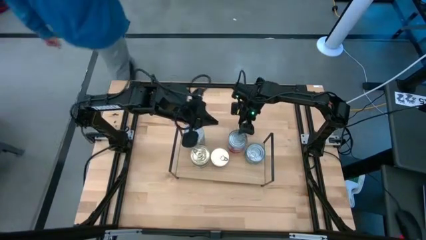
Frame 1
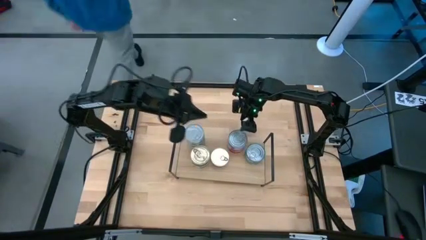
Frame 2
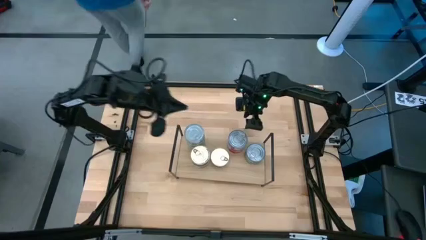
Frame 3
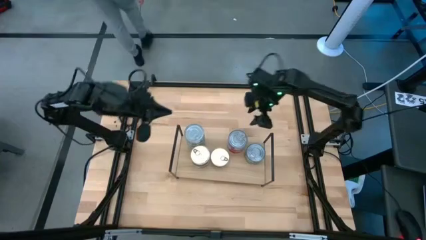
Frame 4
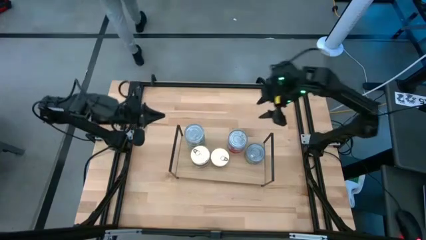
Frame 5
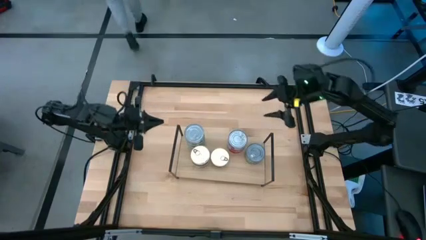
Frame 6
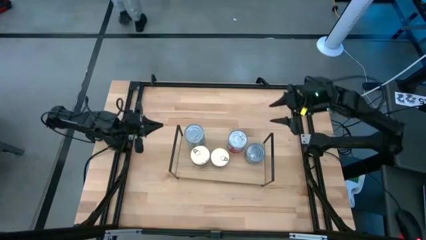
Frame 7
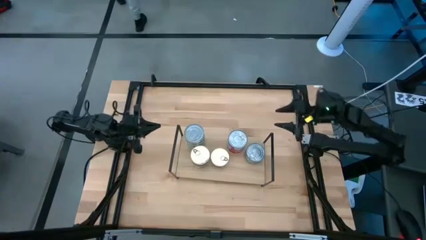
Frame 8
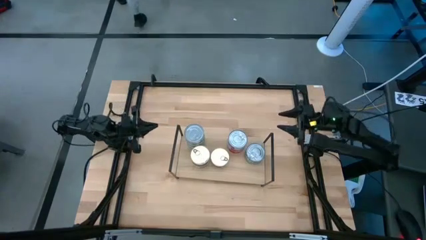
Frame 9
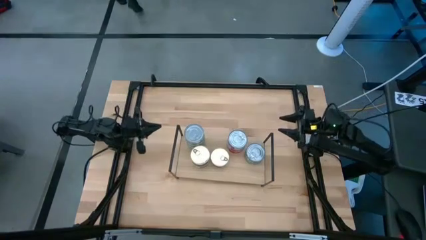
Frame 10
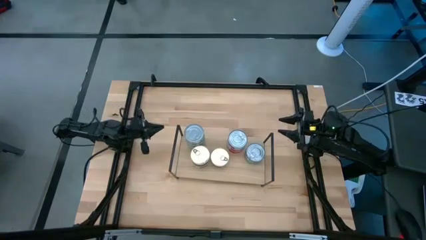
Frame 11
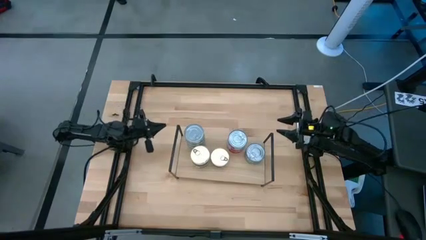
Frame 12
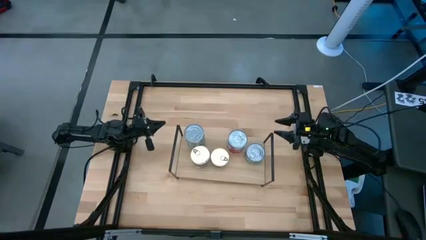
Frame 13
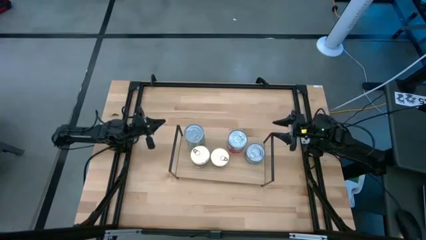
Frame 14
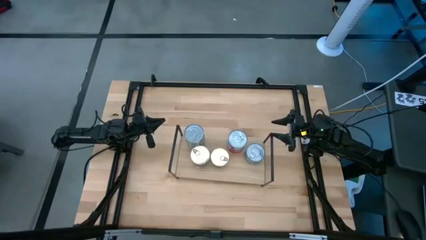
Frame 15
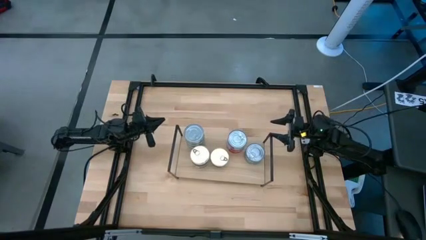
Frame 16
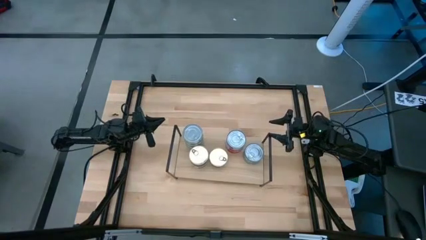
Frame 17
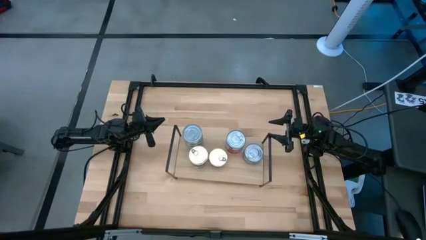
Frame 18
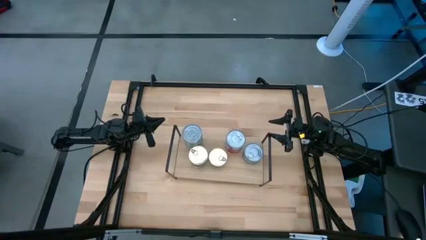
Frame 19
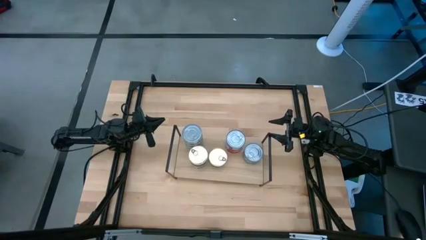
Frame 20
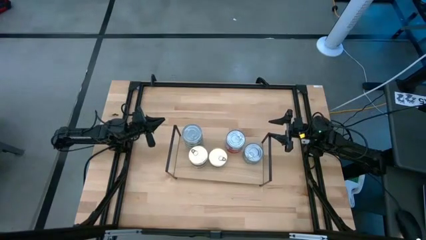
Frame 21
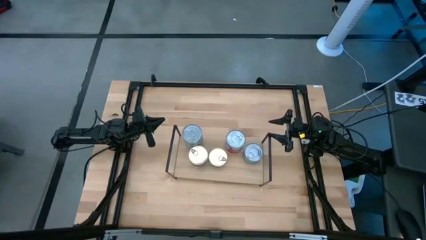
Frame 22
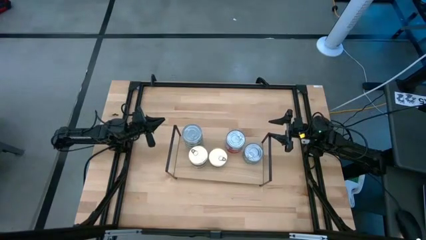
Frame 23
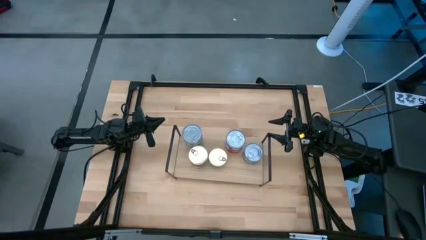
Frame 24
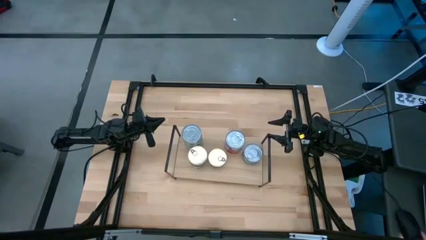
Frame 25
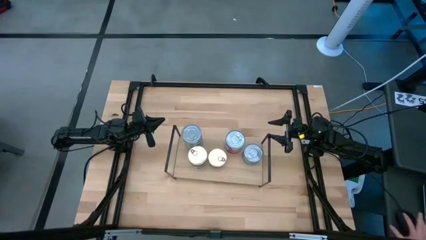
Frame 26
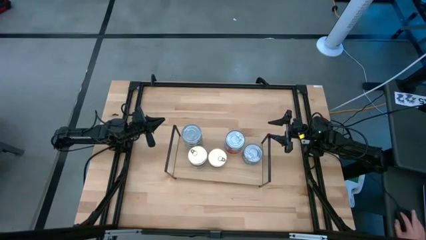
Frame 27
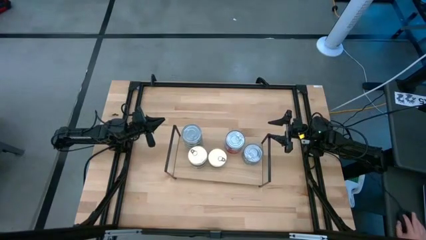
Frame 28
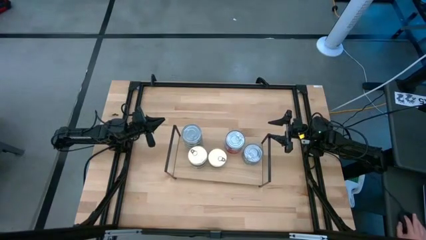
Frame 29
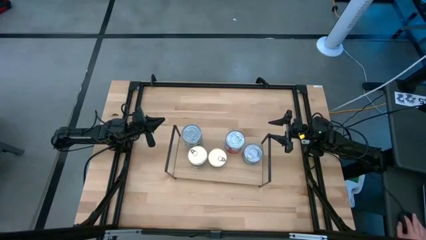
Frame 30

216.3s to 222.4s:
Task: Stack canned seafood by type on shelf
Return to Home Position

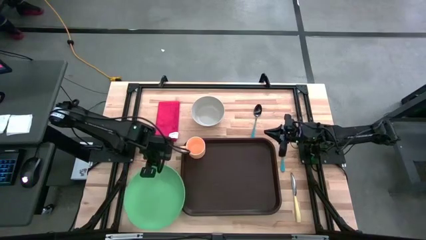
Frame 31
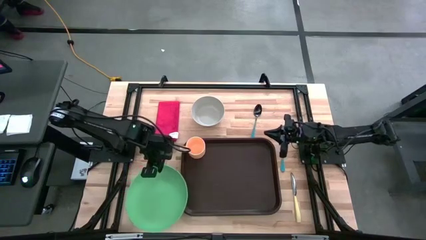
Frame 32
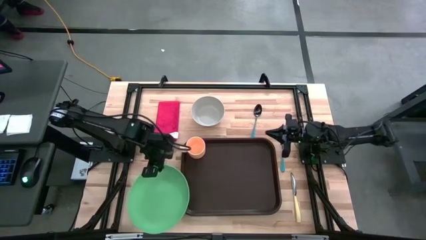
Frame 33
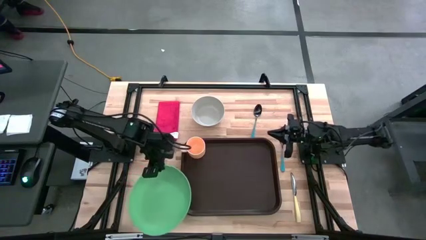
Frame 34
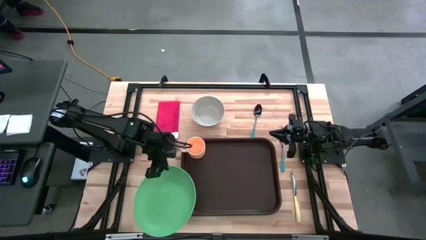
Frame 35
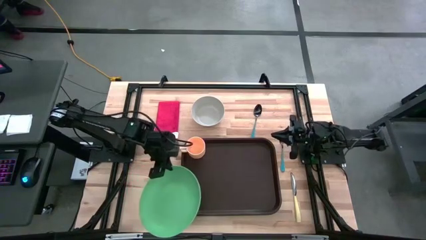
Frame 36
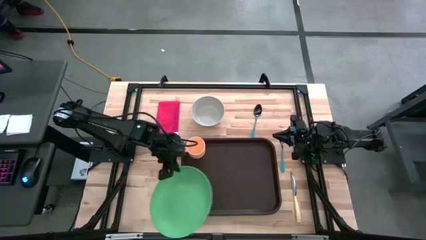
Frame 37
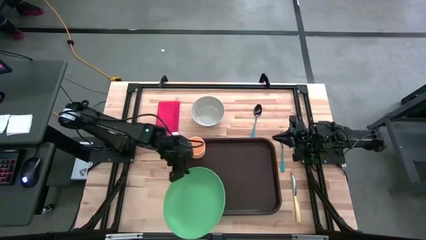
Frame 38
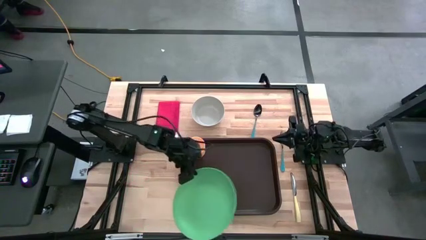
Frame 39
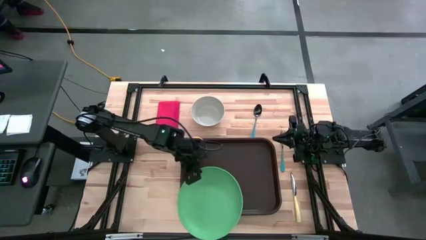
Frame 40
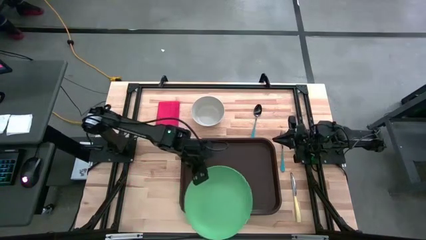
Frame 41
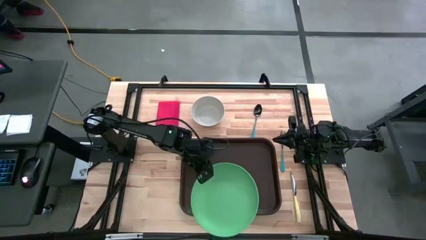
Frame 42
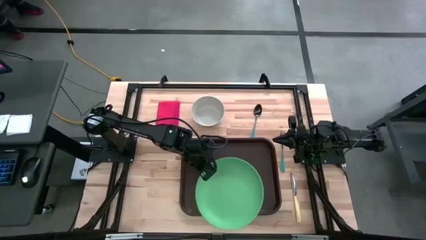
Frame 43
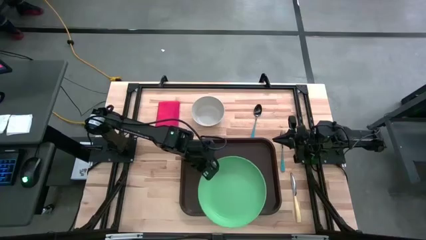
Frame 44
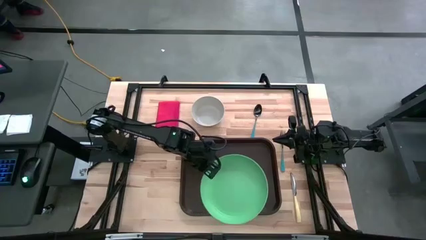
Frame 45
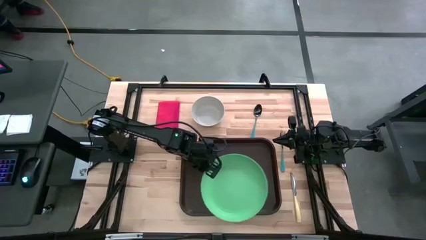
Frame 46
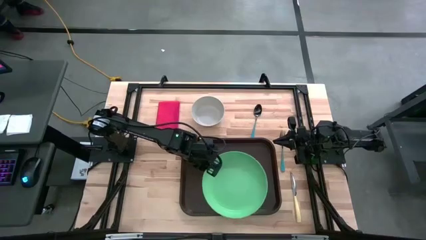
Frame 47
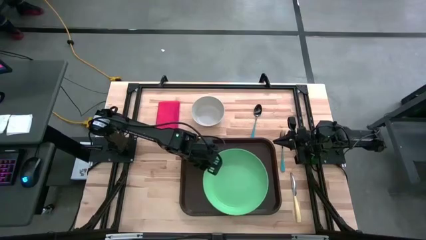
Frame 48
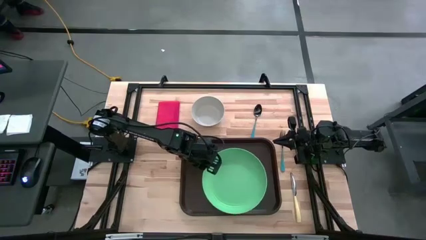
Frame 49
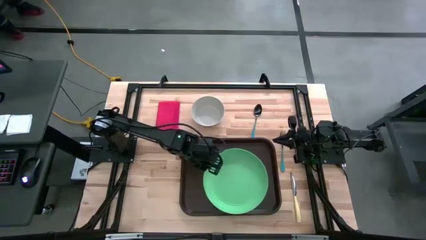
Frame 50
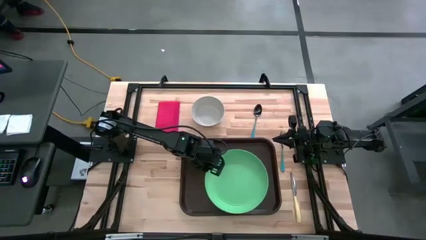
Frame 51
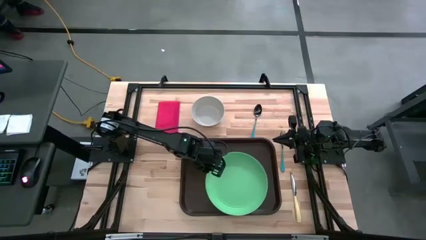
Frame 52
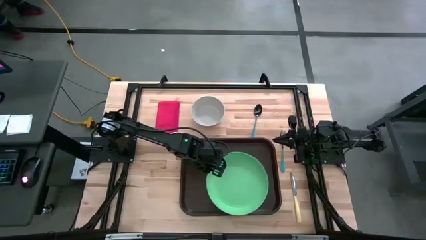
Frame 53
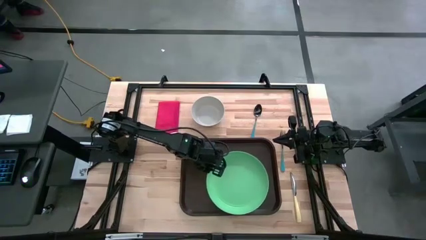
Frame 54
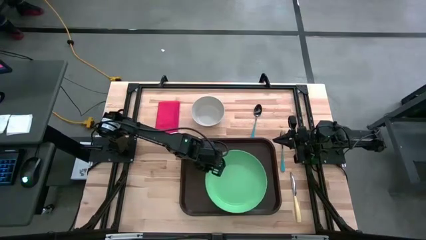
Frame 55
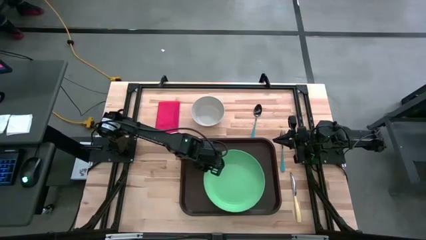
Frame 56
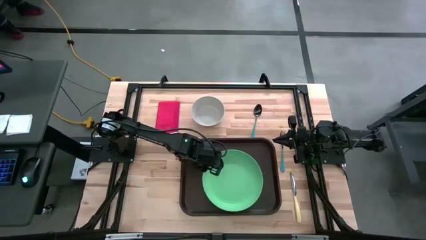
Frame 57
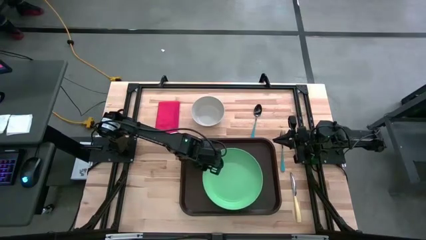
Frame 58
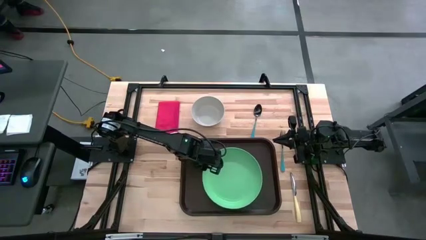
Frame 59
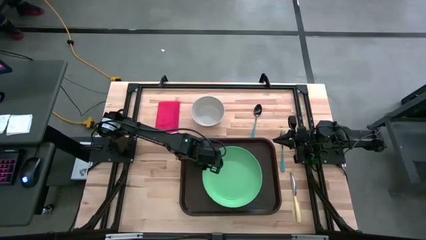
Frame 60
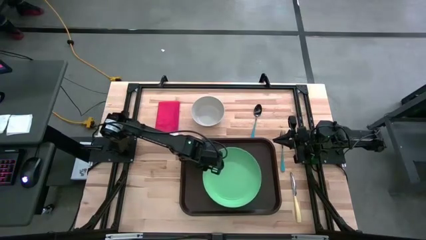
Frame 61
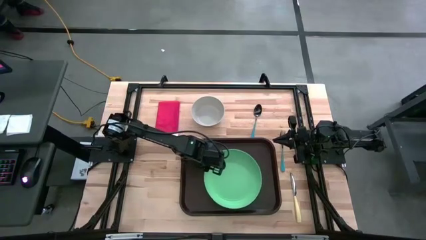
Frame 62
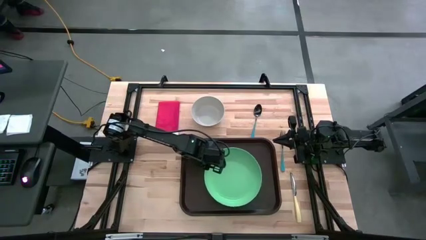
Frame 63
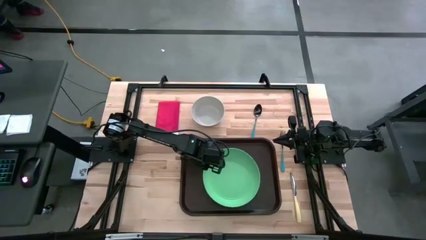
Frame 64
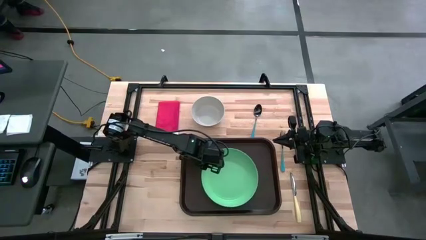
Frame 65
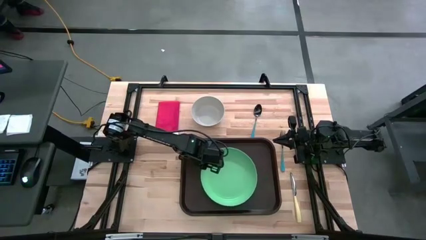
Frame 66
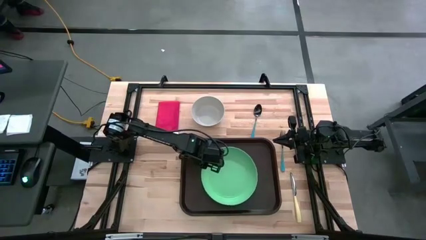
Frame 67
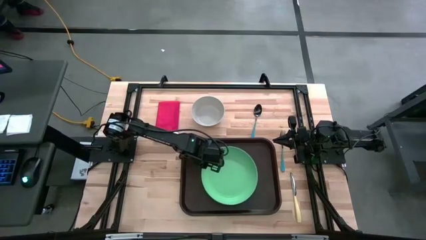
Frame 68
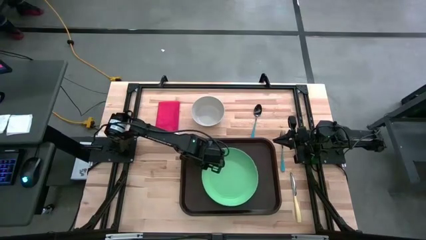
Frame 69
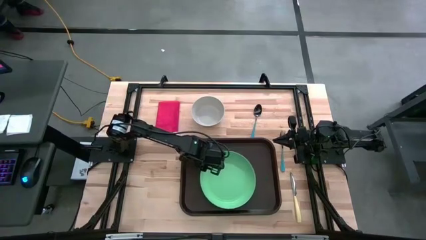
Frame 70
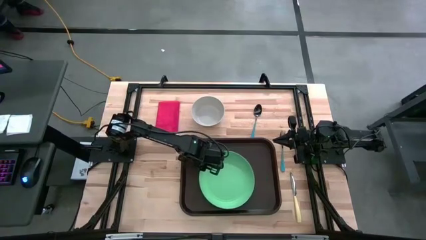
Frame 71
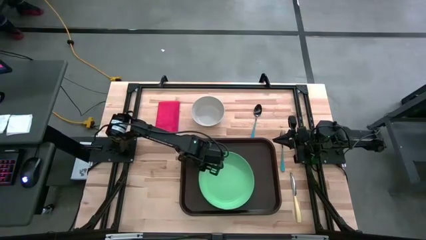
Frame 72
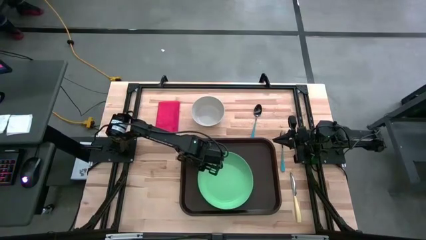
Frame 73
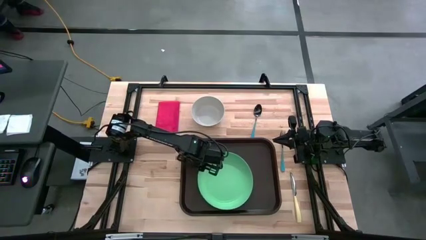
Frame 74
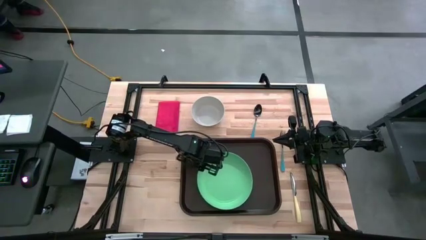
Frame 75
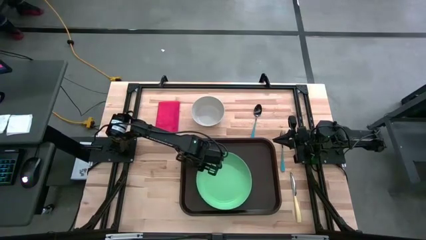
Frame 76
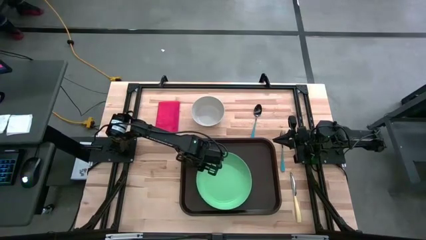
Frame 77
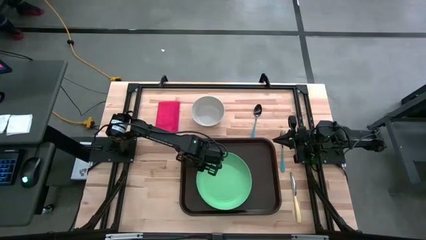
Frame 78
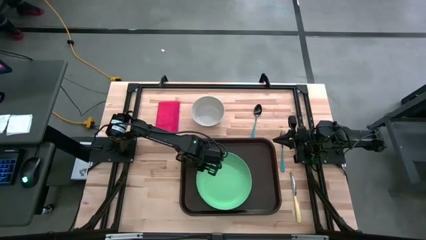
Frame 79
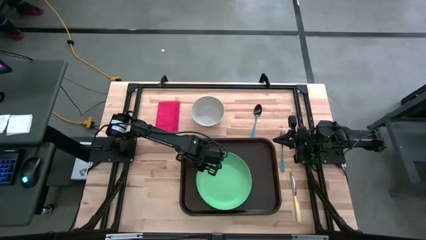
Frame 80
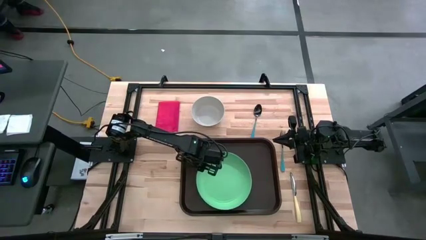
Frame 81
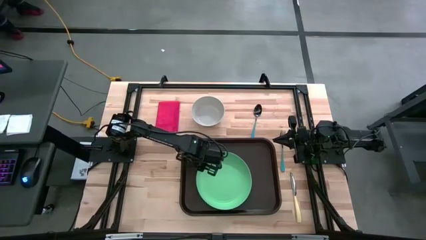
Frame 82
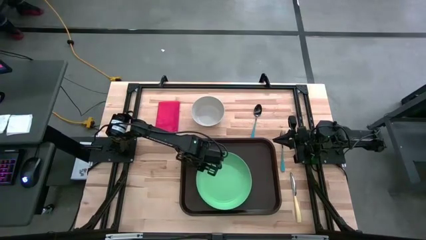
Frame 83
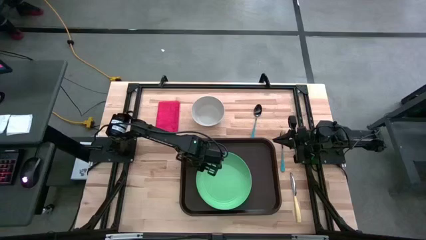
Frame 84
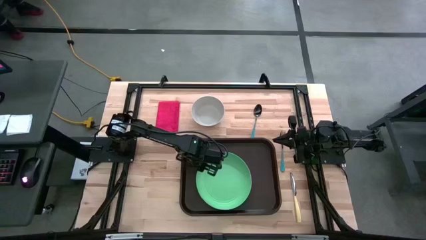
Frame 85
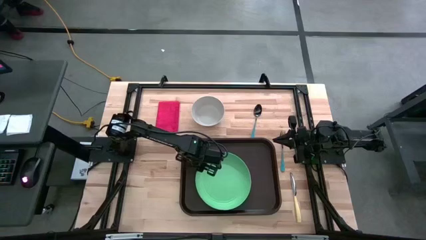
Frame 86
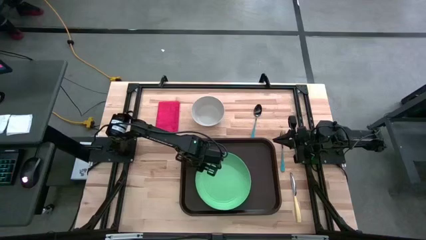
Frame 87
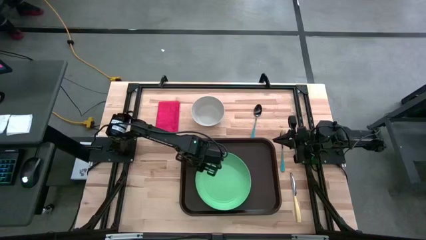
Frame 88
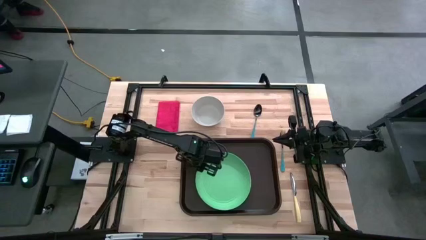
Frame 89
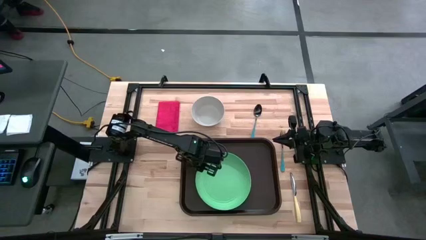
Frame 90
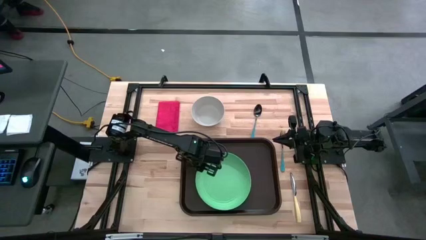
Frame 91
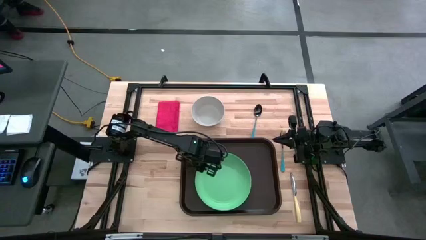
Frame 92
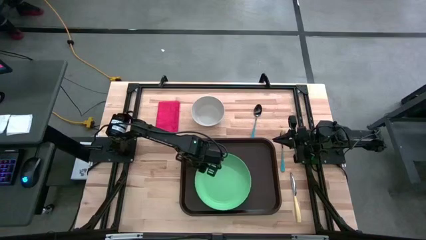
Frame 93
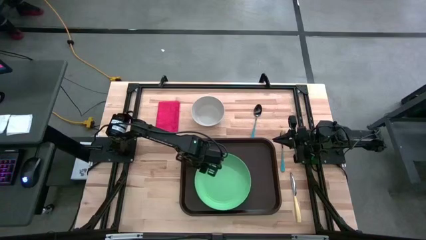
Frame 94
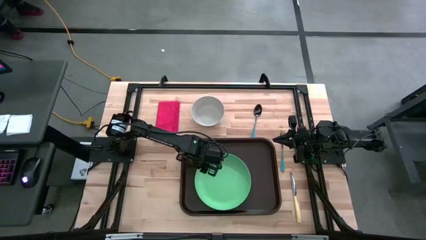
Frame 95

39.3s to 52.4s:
Task: Set up tray
Put the green plate to the bottom right of the yellow cup on the brown serving tray
